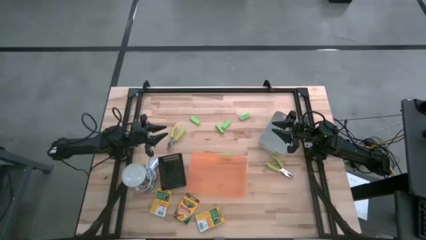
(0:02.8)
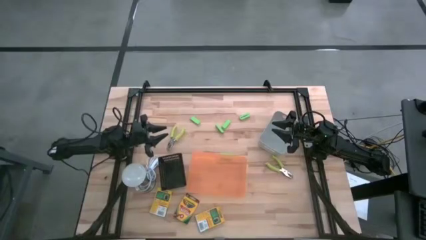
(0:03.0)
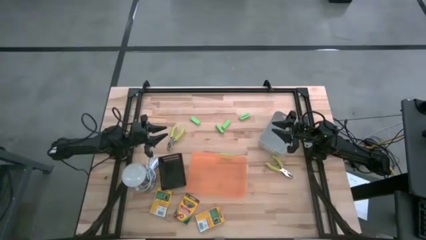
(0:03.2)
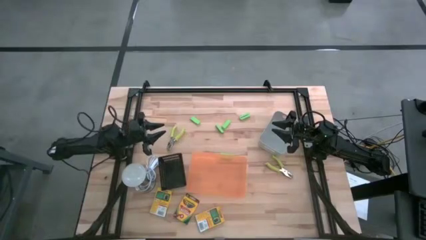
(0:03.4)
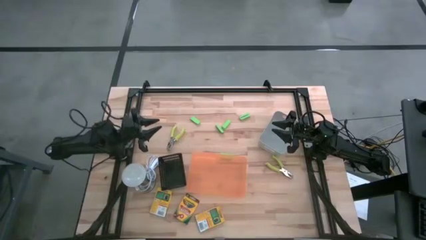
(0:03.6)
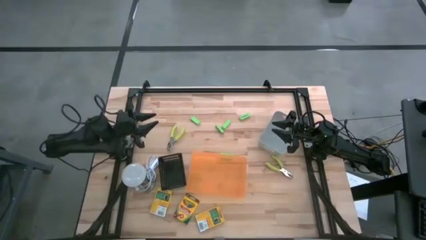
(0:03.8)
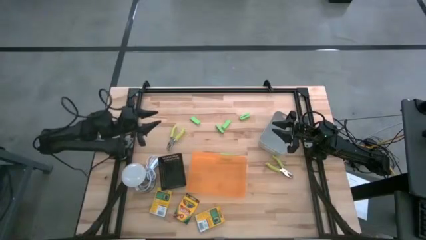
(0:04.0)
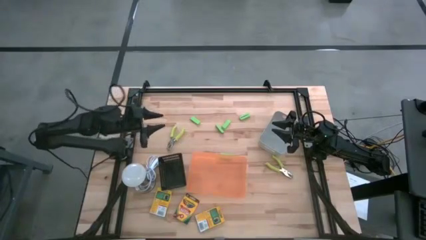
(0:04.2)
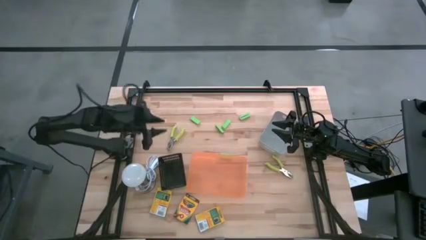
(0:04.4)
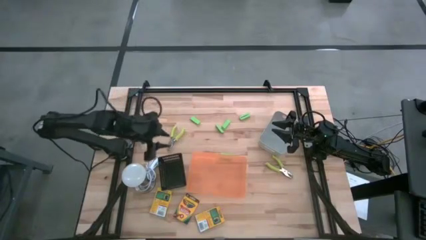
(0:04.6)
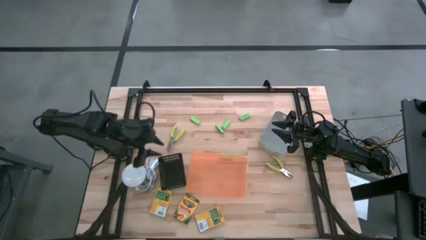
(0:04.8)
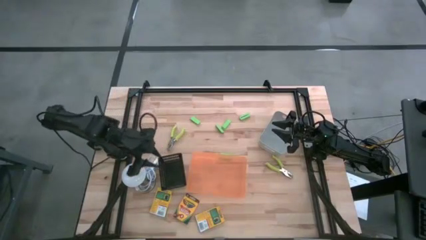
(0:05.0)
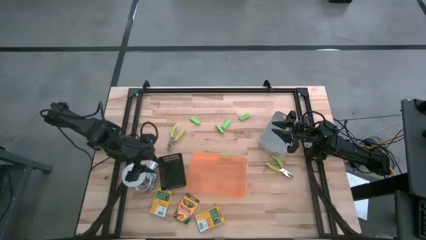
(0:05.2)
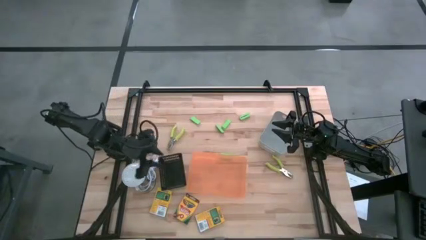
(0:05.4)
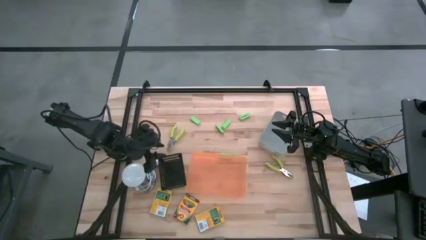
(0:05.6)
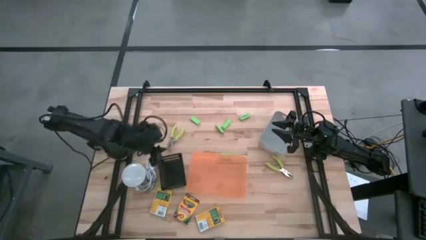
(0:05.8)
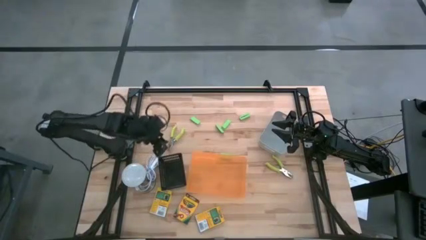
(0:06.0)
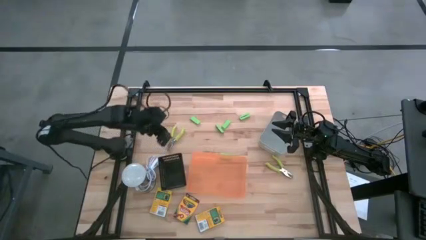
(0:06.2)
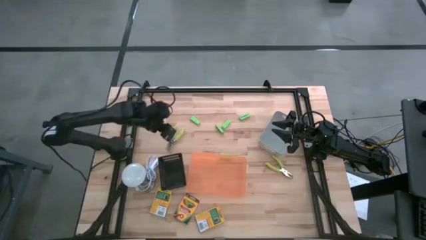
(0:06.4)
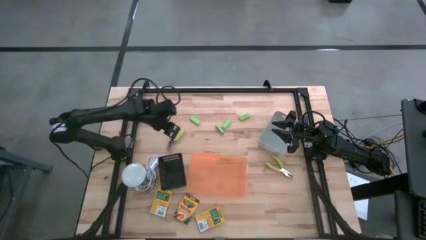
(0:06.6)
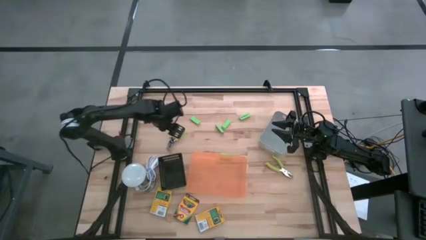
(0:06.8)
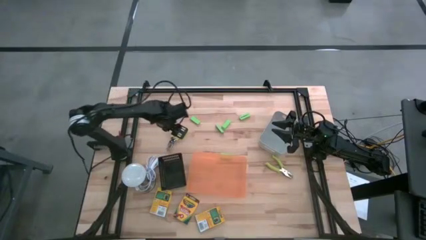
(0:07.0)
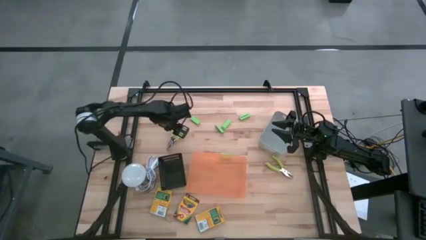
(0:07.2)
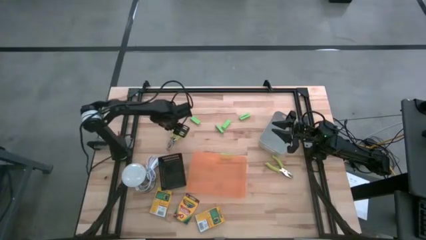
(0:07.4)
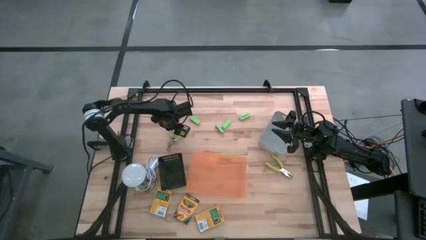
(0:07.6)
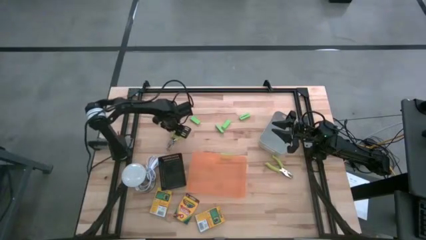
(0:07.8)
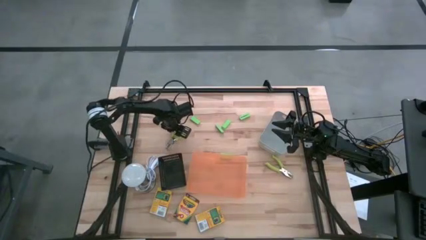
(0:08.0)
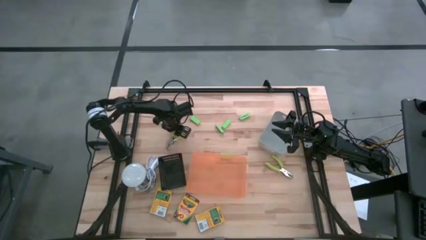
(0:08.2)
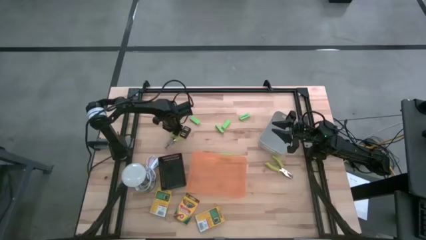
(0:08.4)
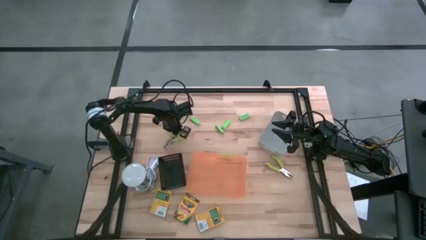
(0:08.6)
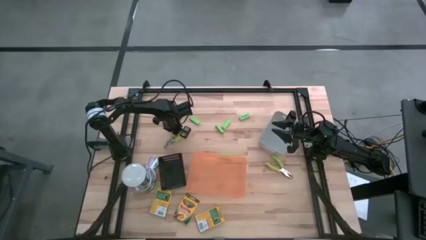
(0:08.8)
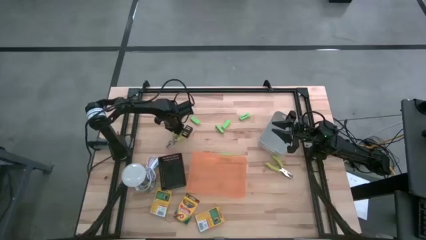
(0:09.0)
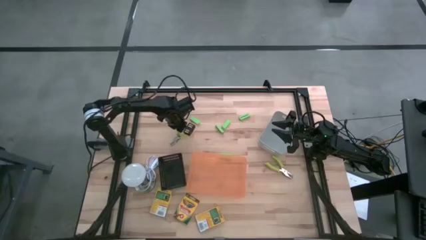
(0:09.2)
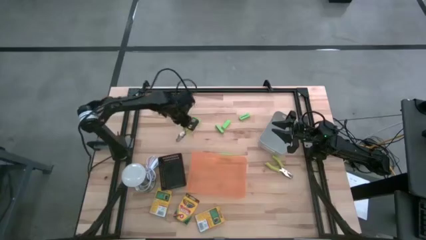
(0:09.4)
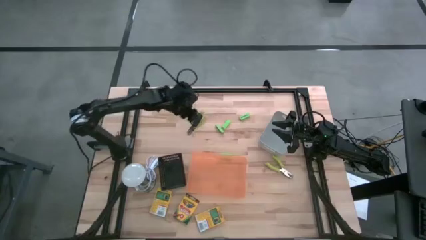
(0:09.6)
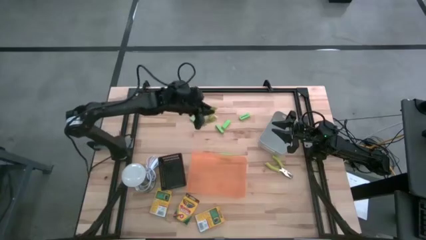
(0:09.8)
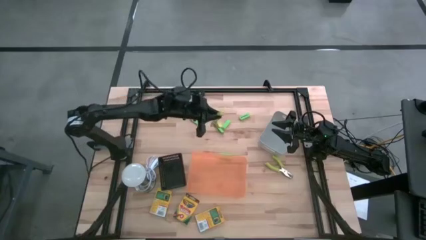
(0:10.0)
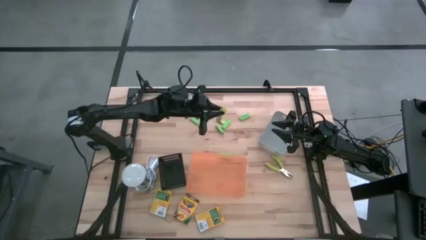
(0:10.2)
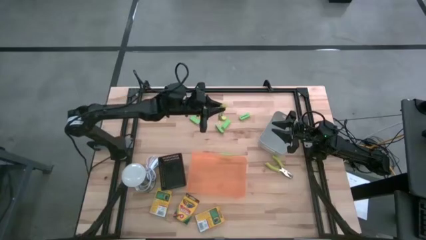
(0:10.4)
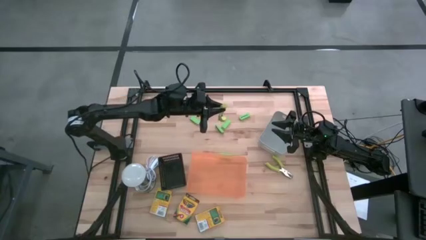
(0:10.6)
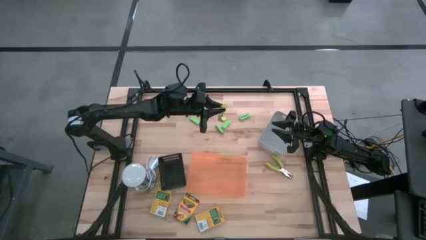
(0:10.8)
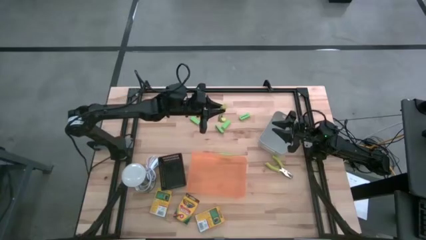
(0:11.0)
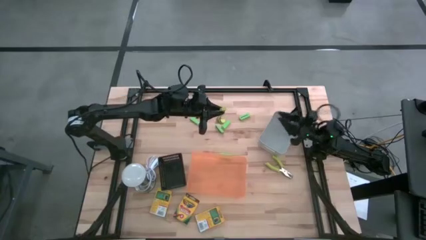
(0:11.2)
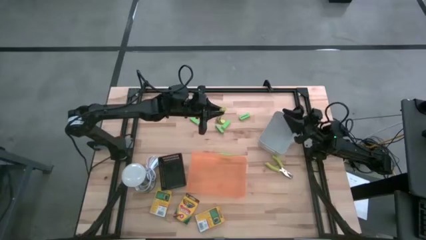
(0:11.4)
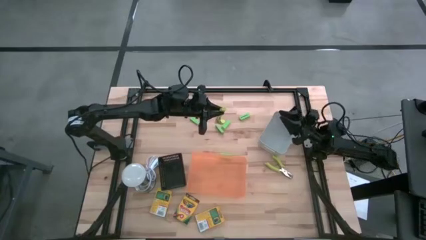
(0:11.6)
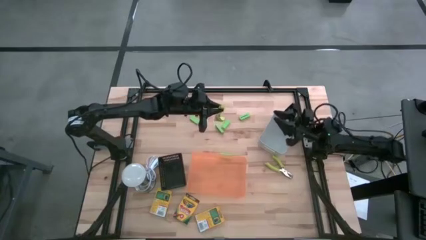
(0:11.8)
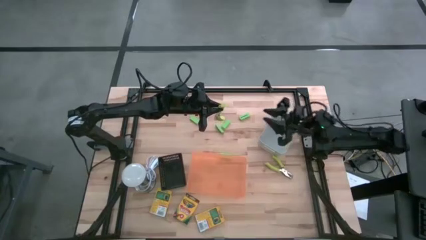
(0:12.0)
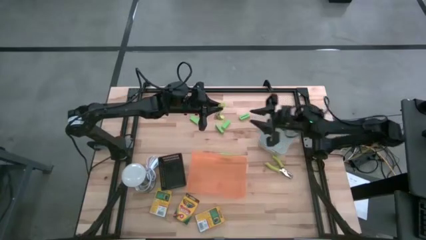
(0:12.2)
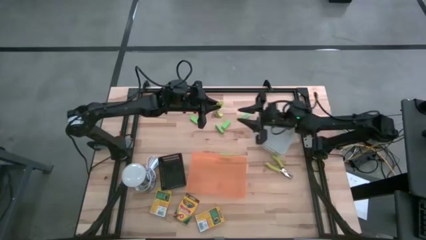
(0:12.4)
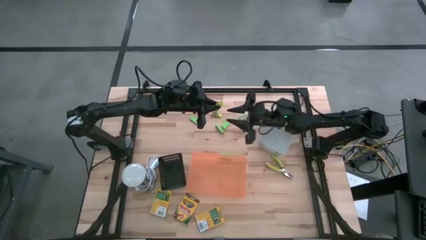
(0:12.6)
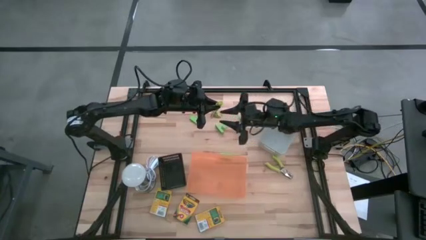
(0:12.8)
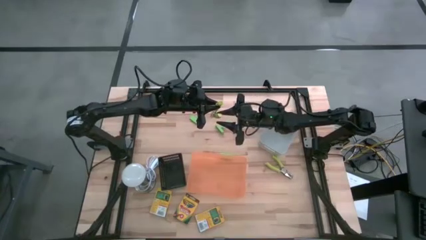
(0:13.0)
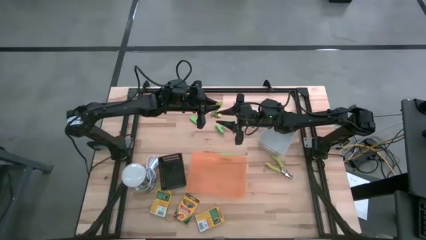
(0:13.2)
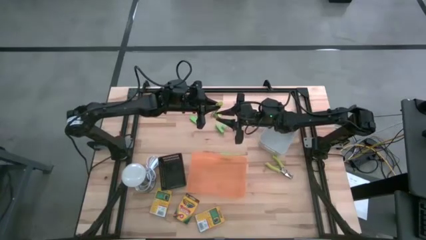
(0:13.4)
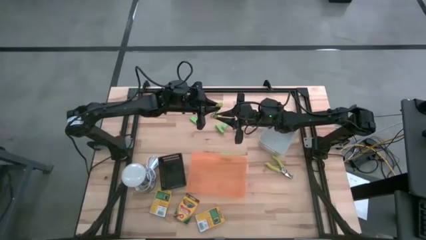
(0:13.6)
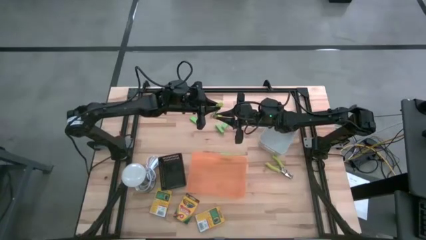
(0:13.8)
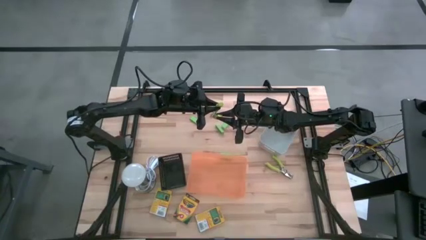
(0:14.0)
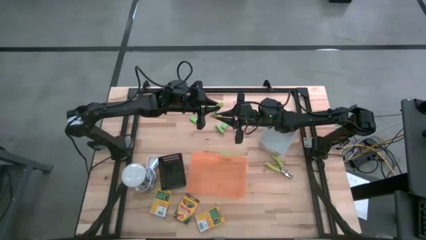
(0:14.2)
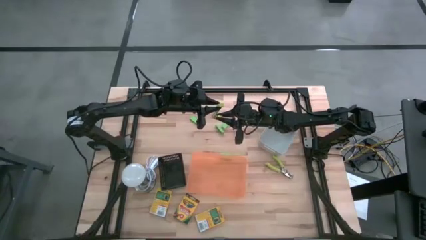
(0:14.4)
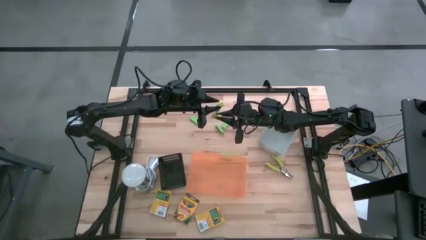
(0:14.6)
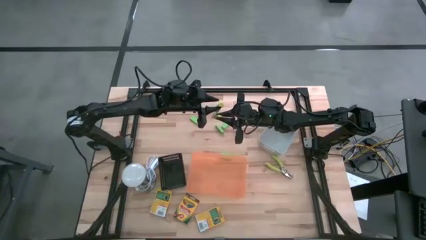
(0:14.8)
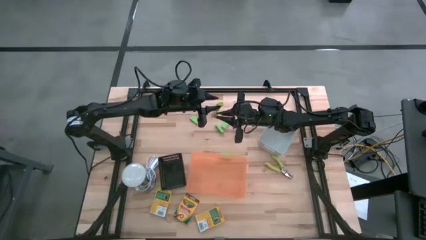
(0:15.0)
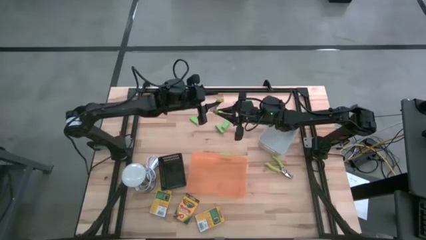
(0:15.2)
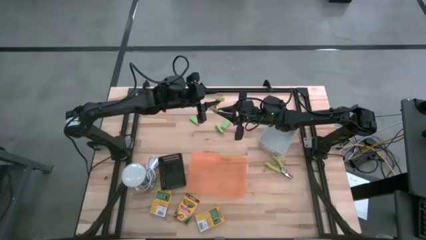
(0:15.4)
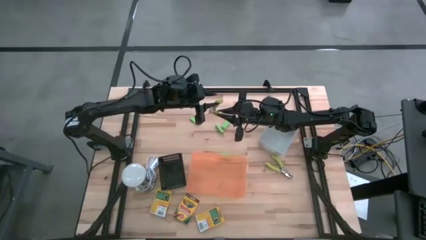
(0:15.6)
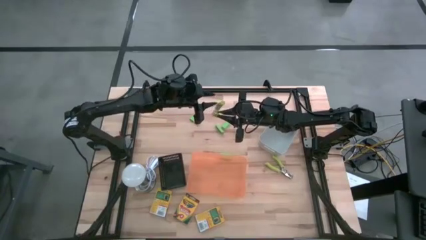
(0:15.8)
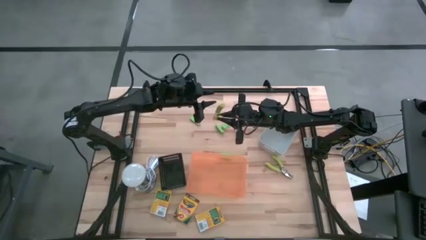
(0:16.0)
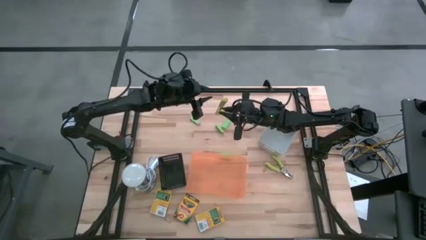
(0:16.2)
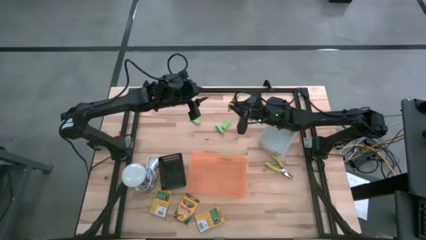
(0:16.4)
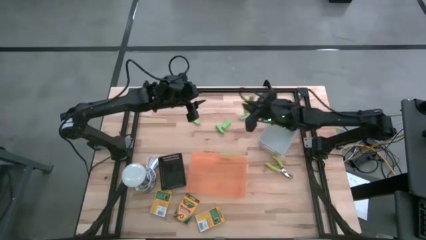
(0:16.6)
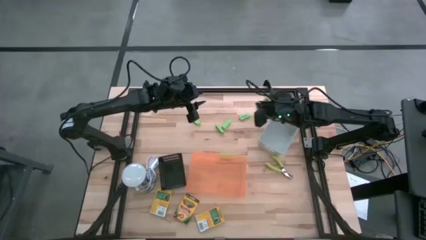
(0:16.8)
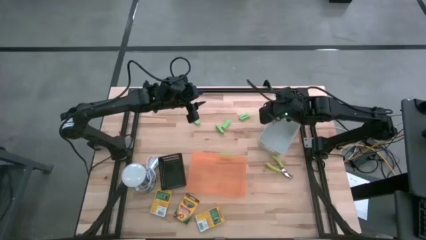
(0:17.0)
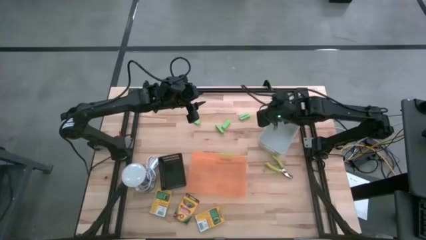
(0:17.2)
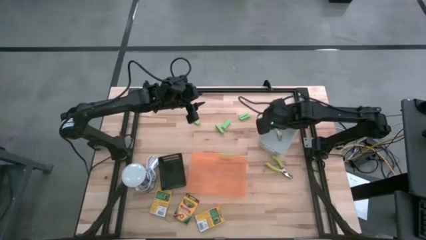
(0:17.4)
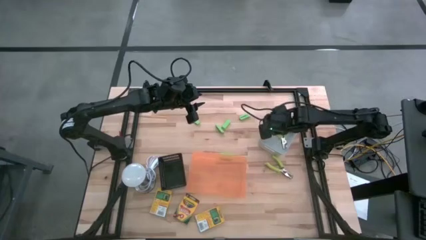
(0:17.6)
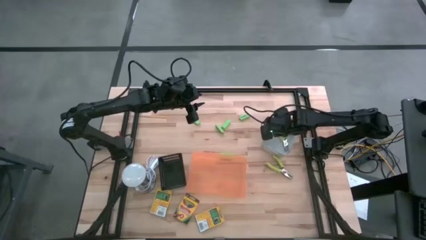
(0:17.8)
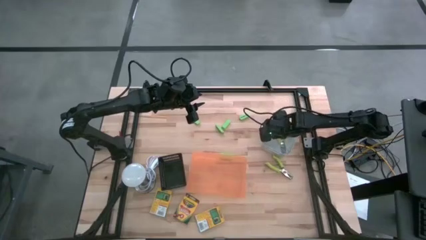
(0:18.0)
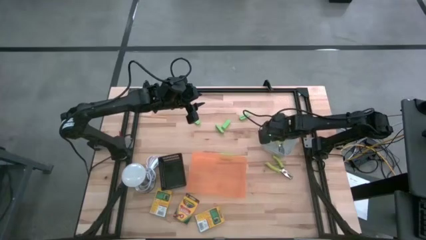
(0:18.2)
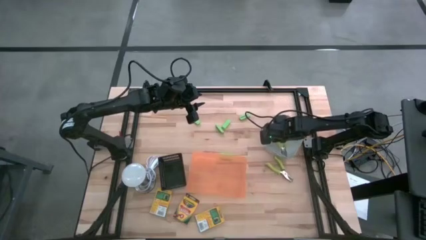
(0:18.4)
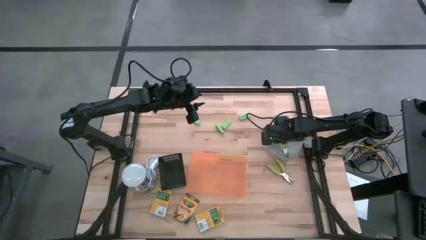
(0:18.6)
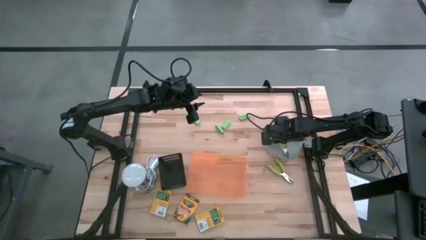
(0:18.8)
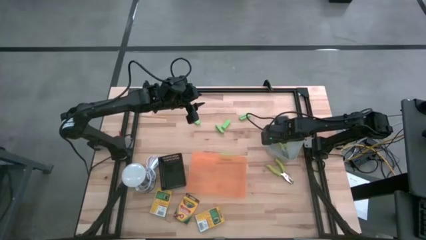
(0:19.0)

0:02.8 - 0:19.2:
Task: Pick & Place School Supplies
Put the top green hole puncher into the gray bin
